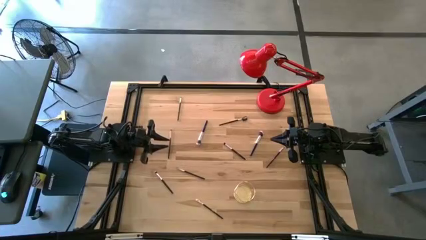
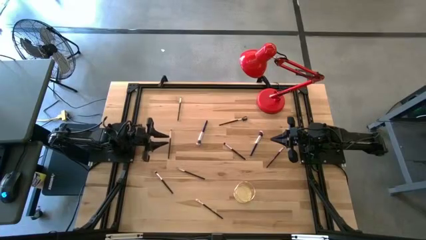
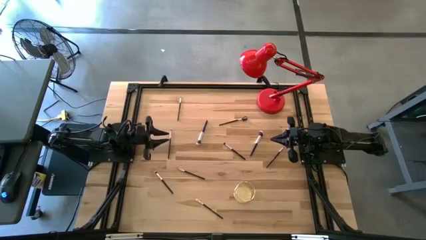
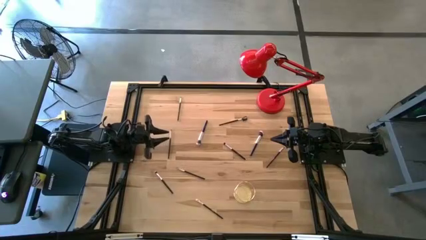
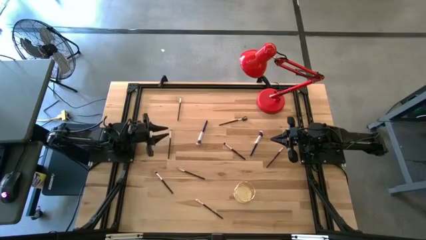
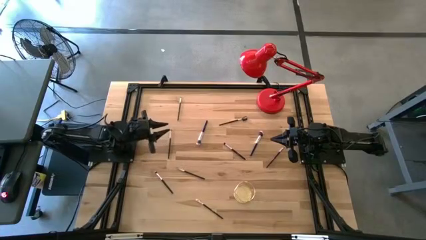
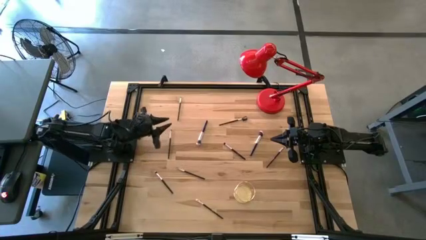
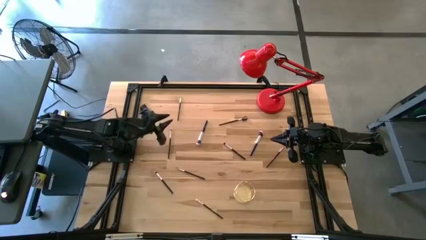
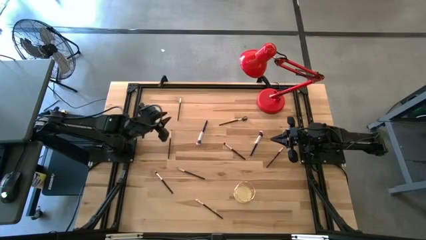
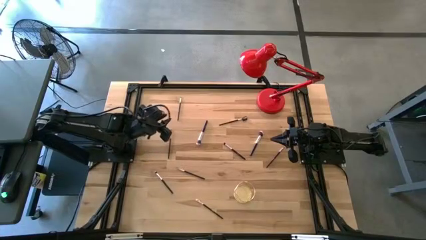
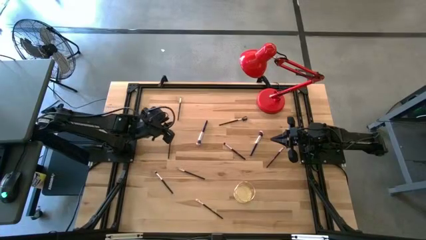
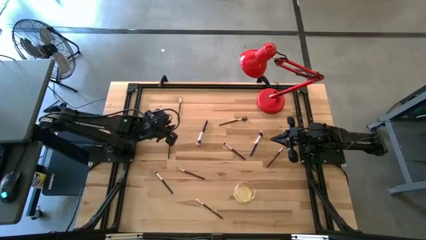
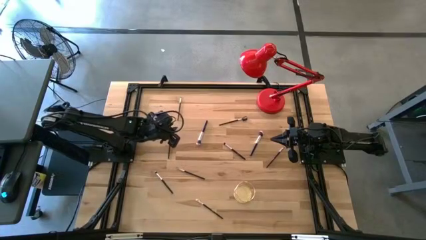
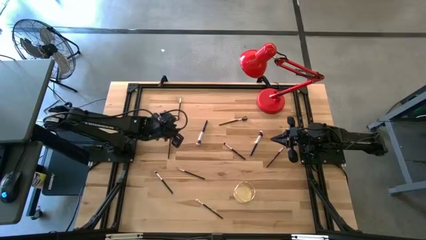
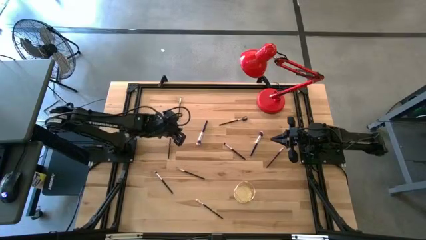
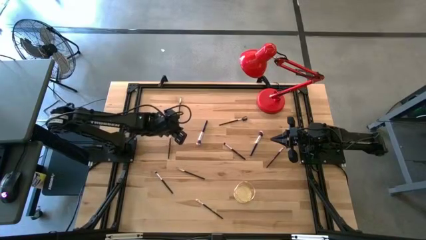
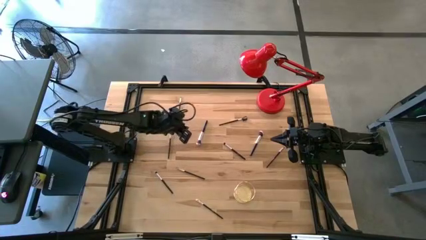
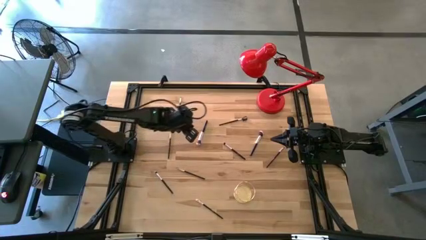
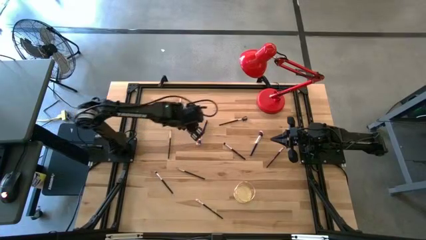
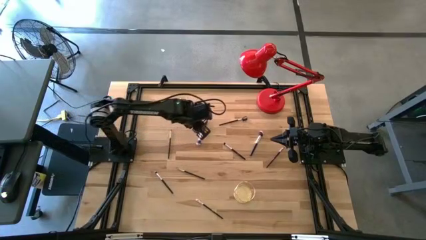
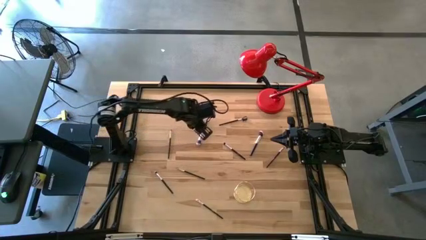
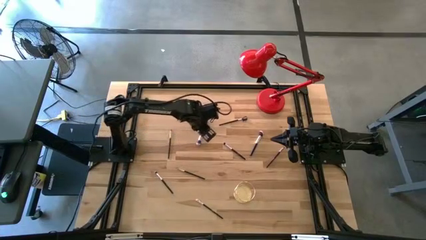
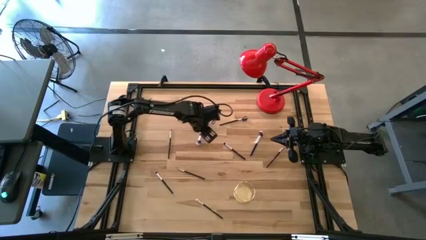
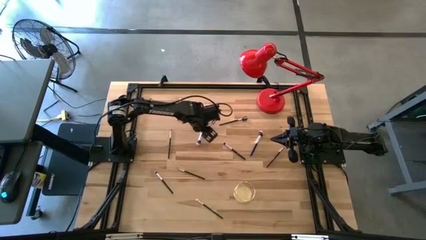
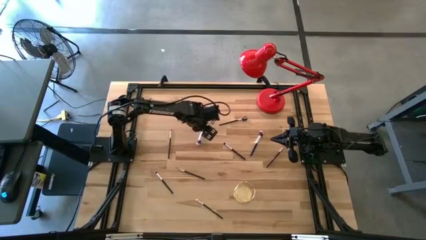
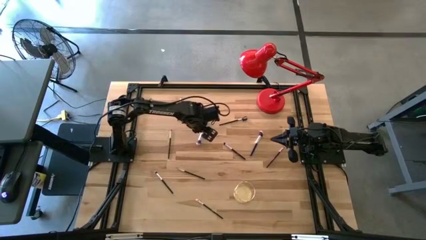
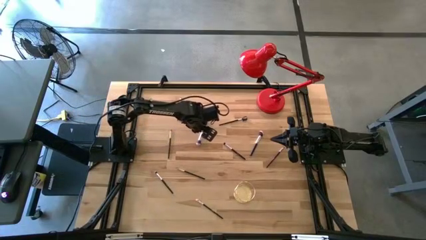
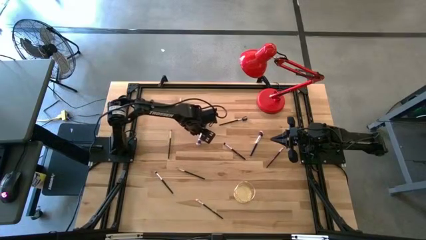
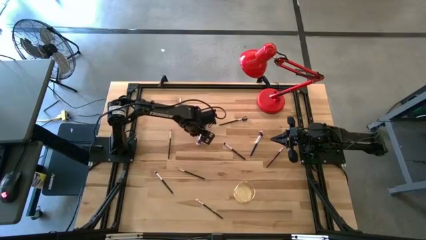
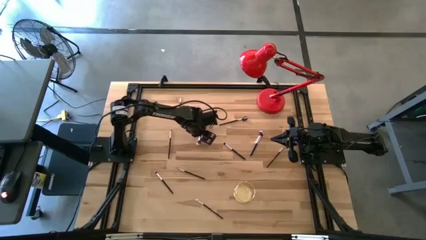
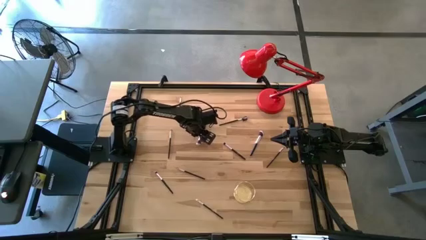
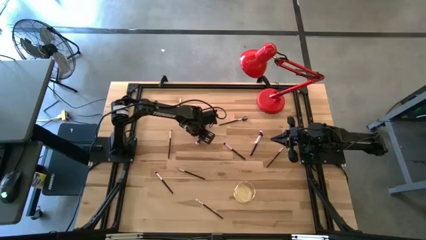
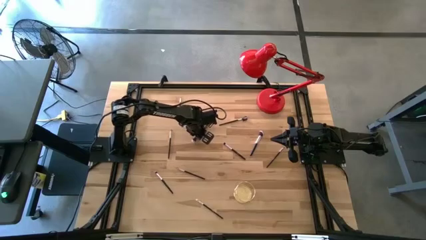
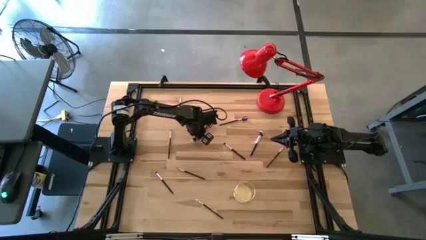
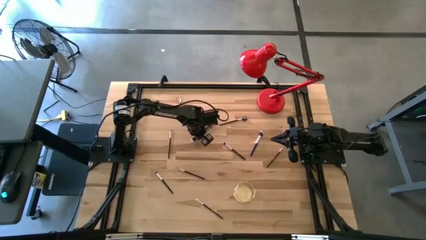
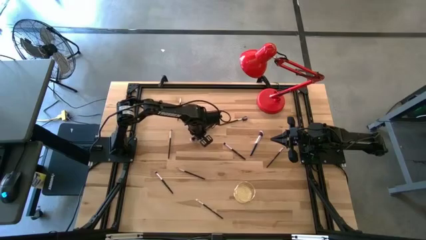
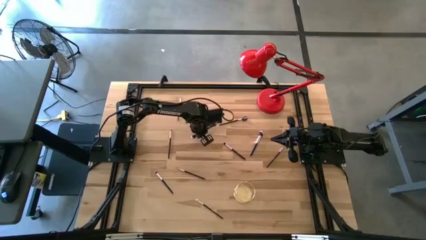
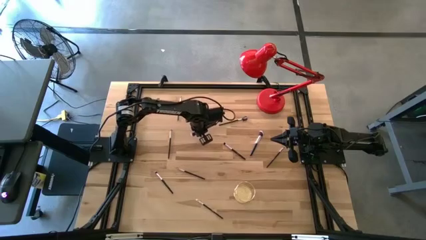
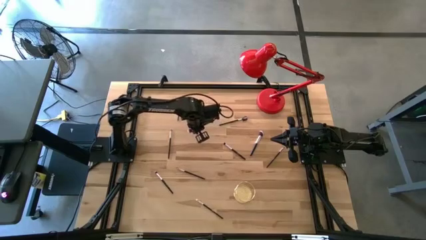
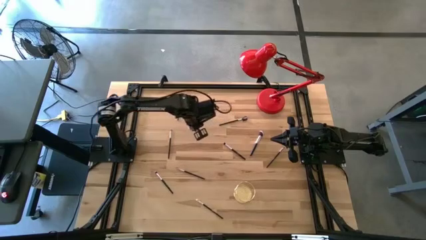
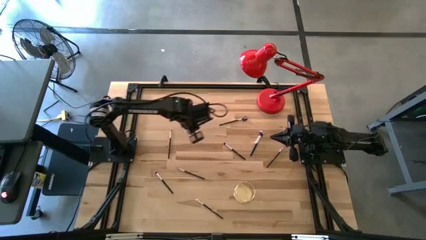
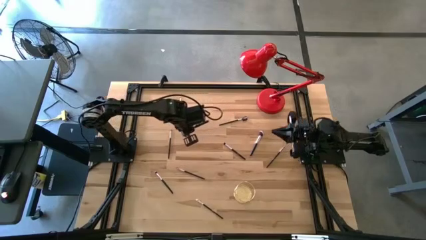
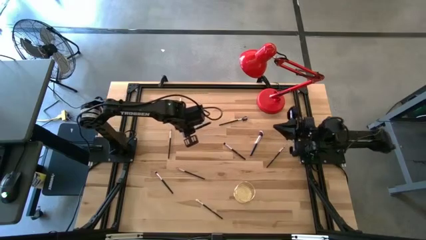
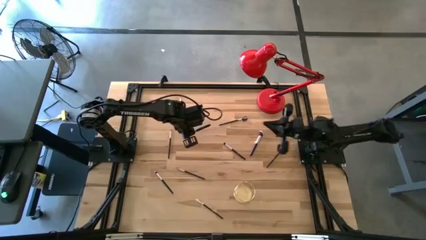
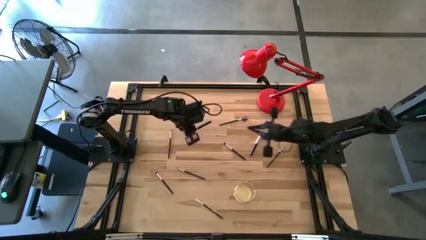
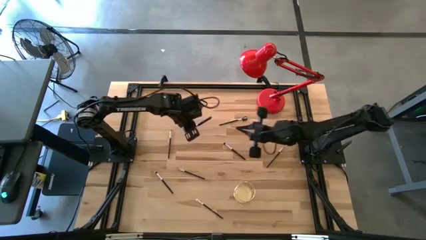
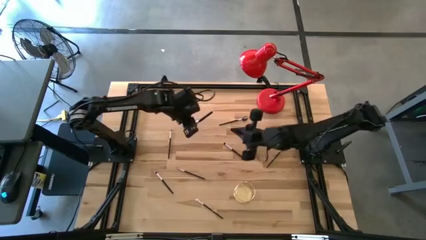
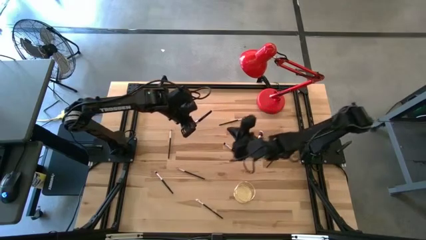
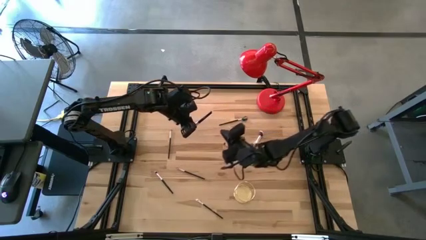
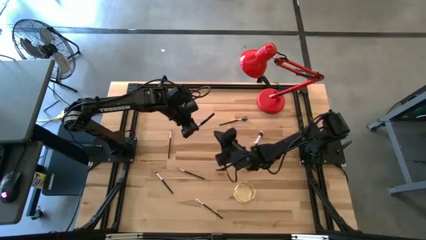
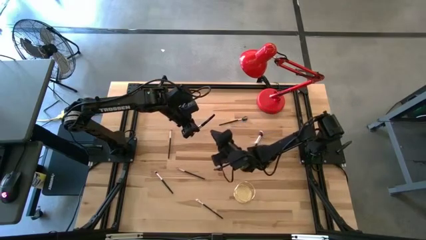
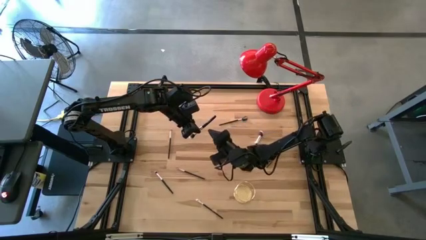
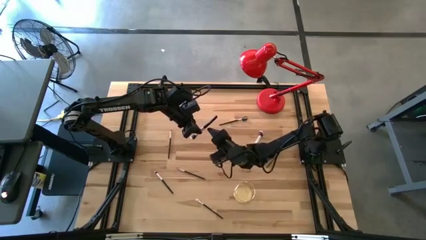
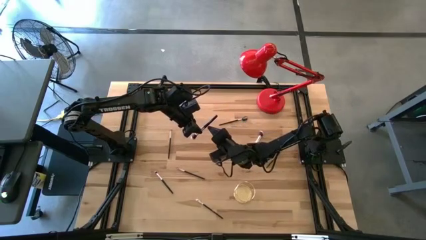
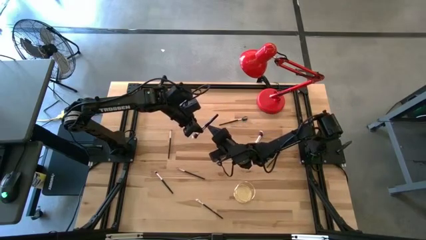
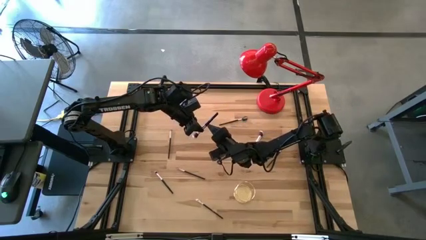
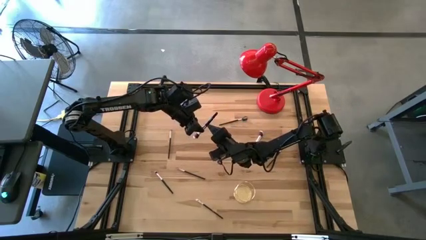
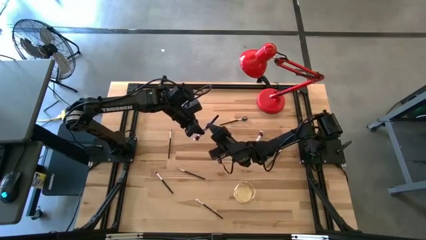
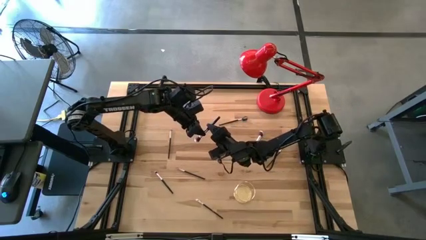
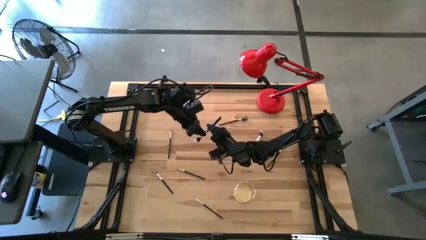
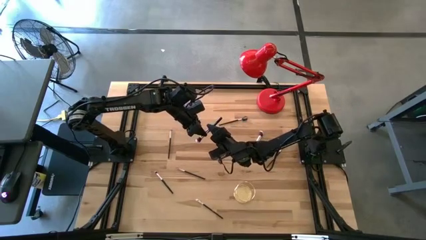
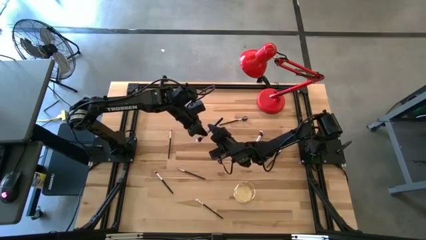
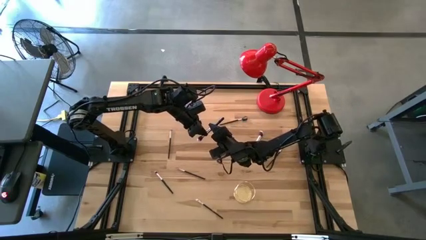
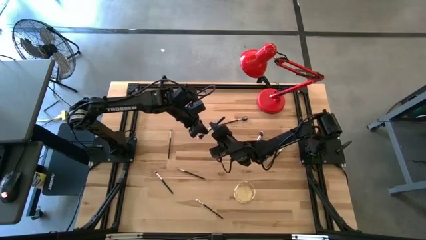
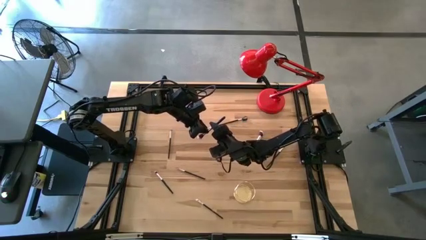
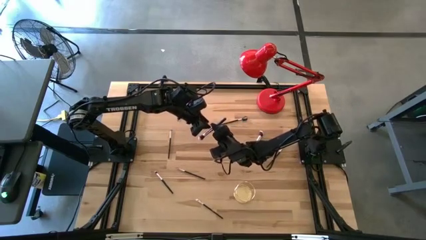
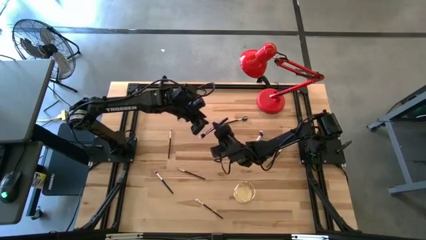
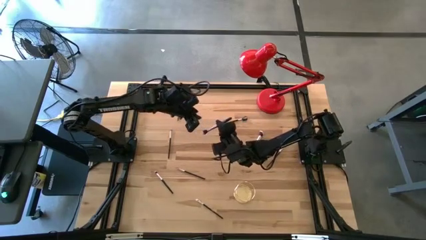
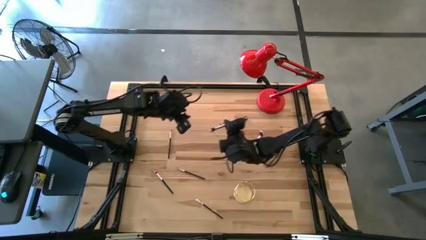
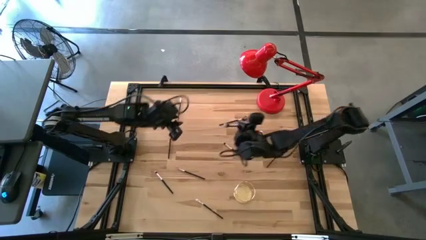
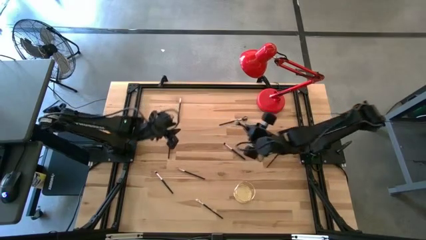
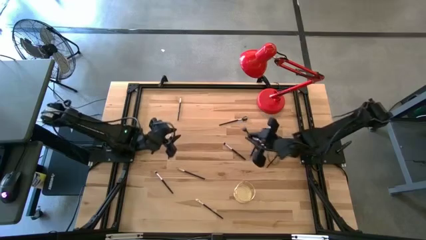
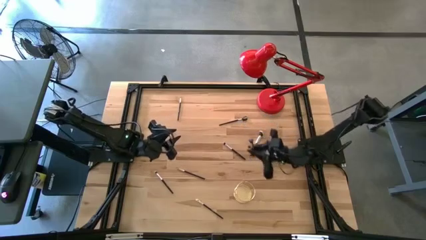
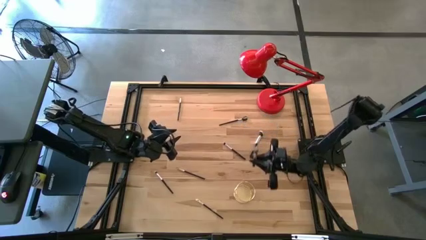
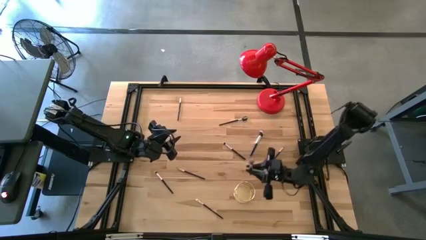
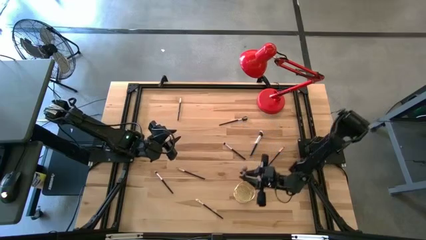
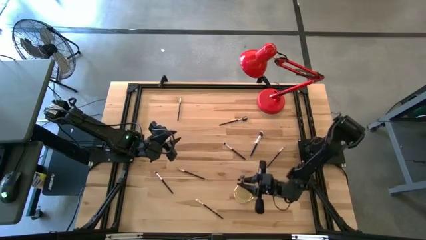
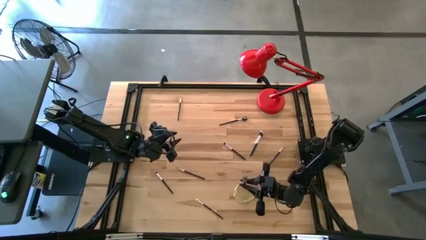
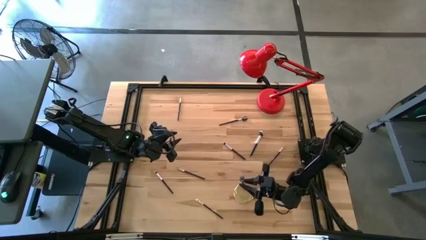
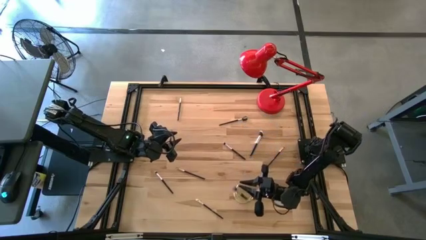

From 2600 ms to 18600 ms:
Task: Pick & Place Makeup Brushes
Put the left powder brush into the gold makeup holder
